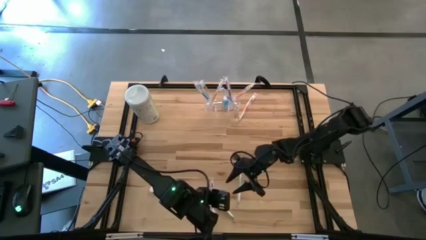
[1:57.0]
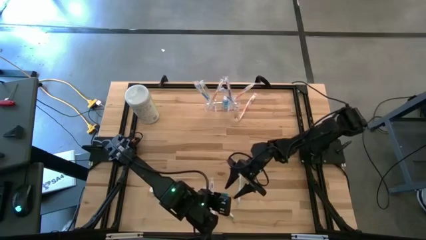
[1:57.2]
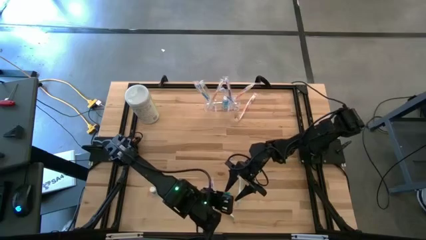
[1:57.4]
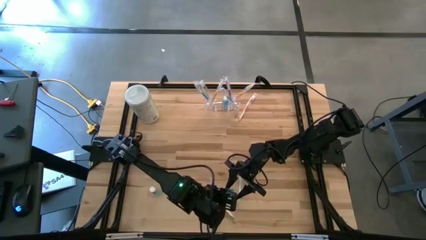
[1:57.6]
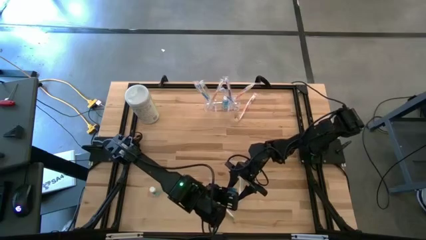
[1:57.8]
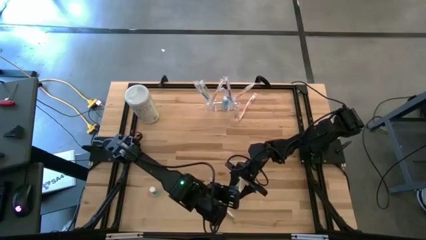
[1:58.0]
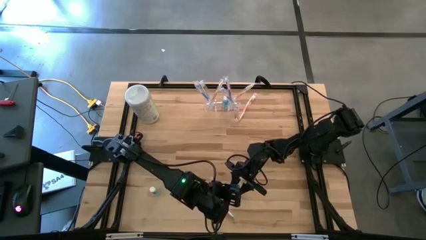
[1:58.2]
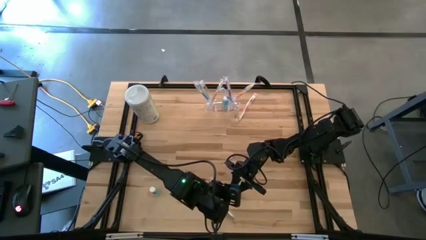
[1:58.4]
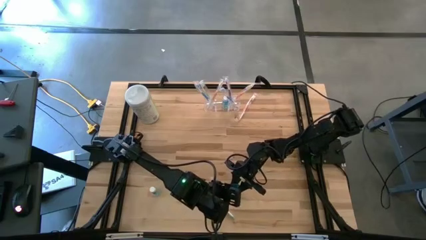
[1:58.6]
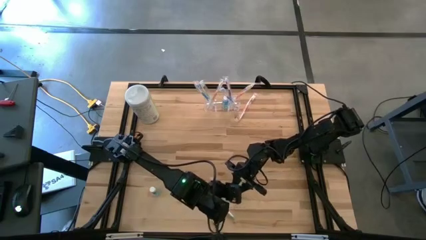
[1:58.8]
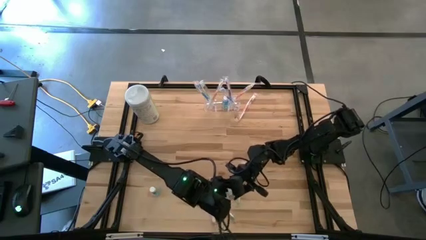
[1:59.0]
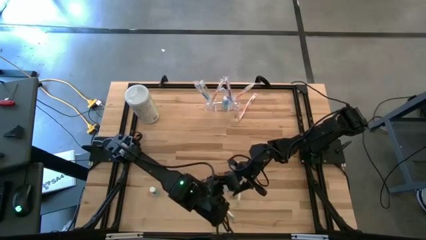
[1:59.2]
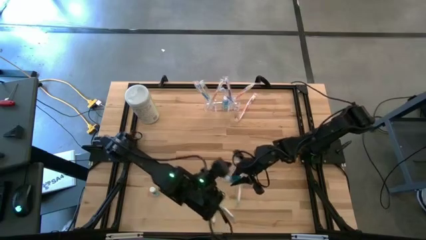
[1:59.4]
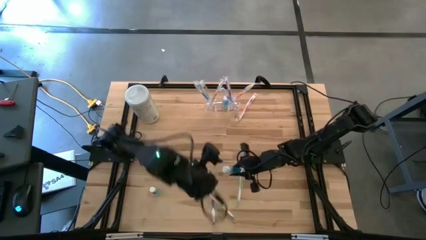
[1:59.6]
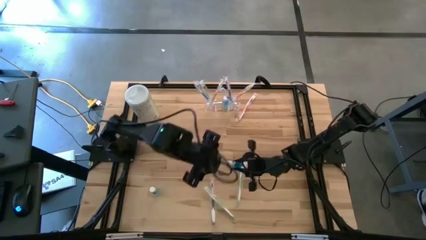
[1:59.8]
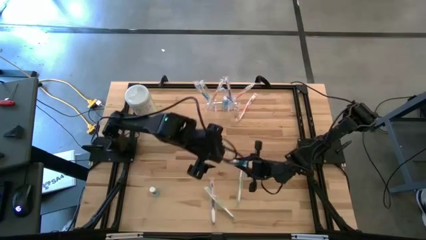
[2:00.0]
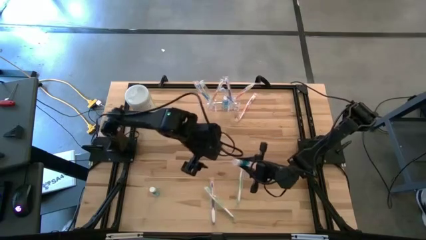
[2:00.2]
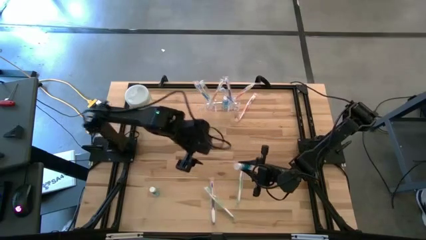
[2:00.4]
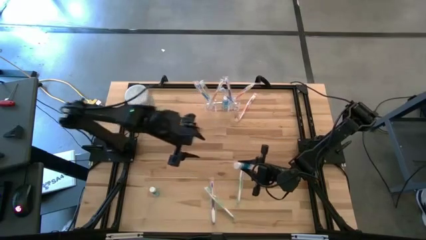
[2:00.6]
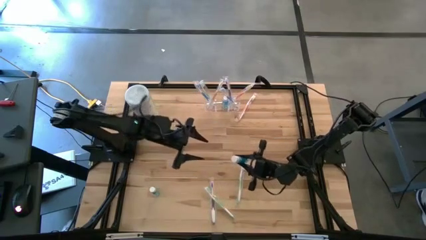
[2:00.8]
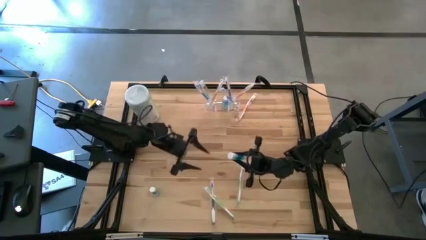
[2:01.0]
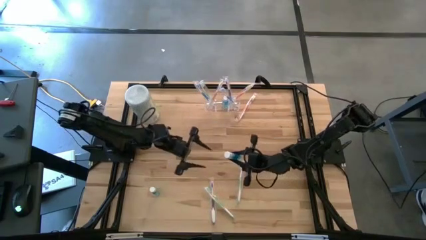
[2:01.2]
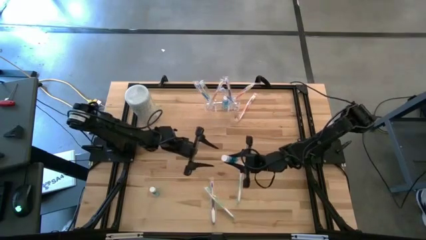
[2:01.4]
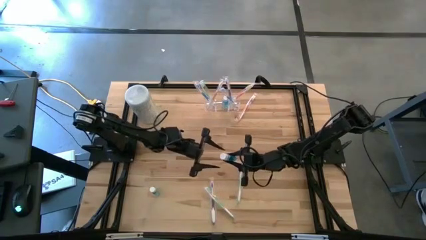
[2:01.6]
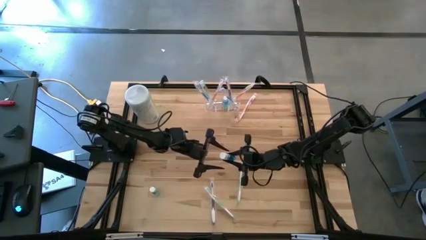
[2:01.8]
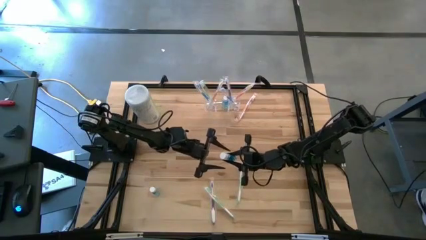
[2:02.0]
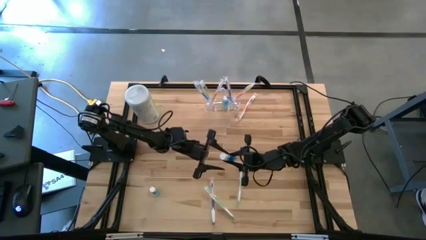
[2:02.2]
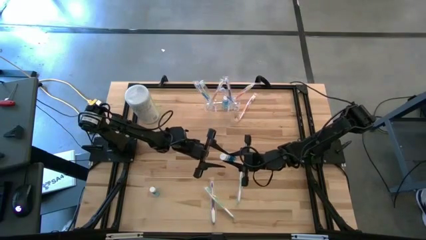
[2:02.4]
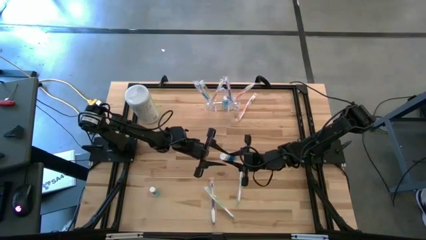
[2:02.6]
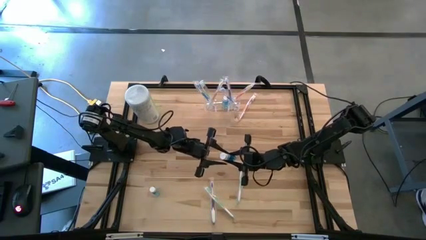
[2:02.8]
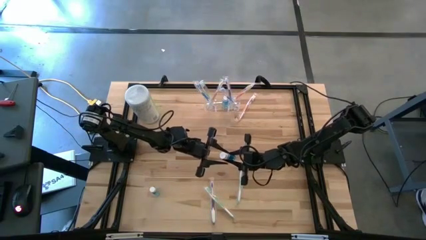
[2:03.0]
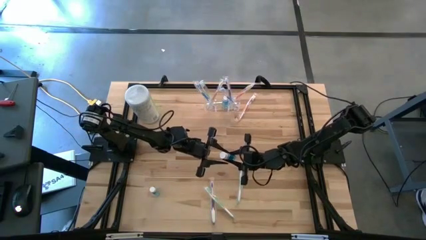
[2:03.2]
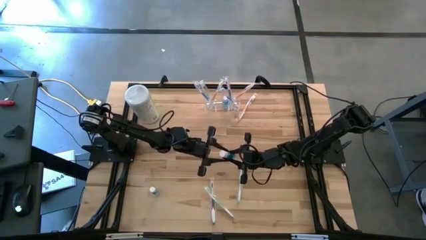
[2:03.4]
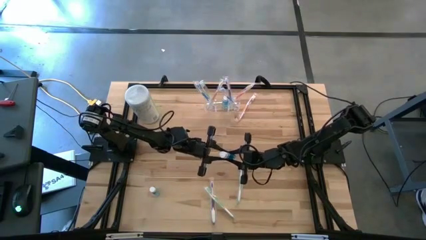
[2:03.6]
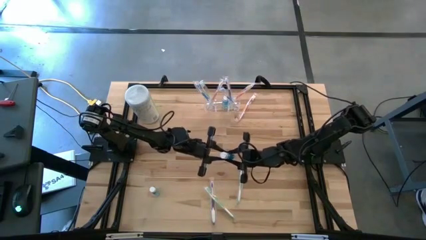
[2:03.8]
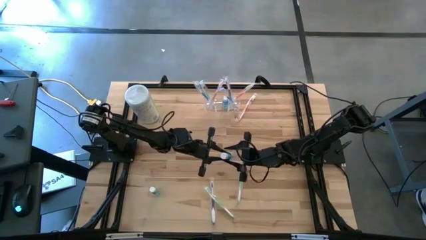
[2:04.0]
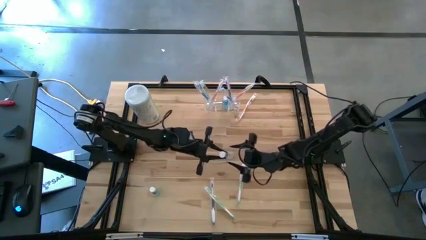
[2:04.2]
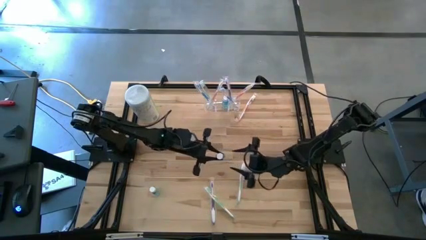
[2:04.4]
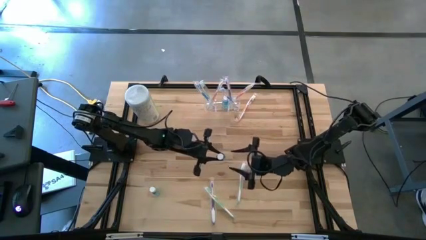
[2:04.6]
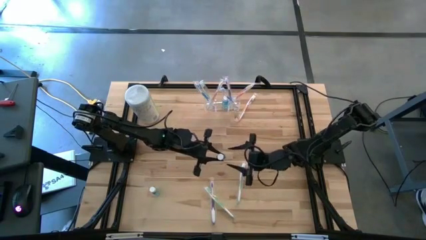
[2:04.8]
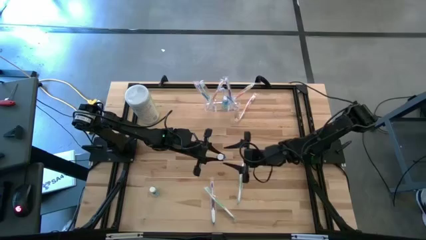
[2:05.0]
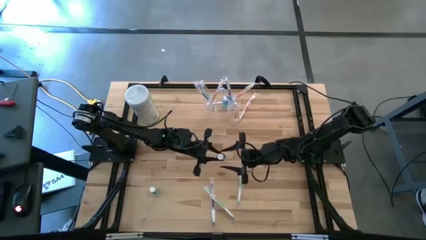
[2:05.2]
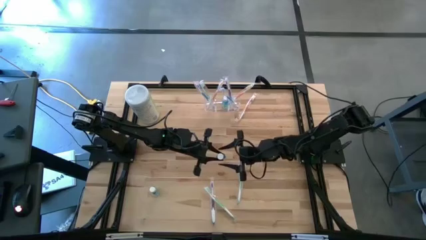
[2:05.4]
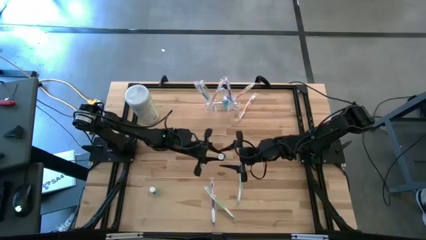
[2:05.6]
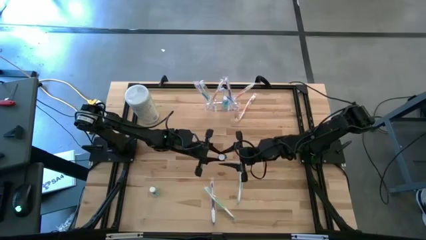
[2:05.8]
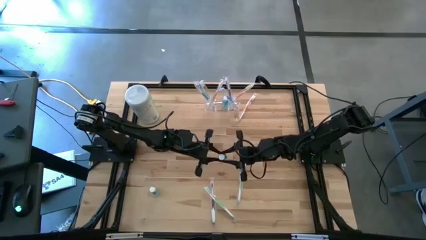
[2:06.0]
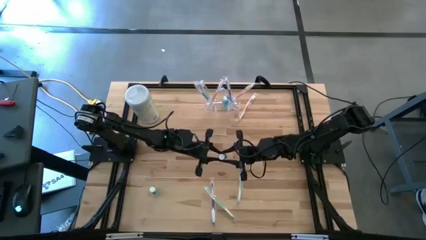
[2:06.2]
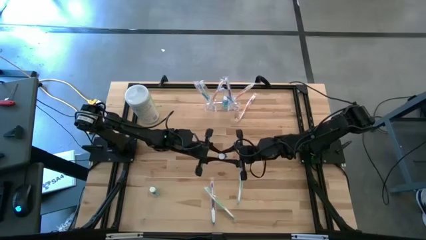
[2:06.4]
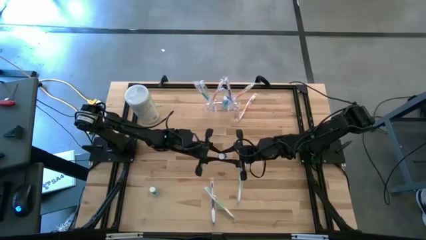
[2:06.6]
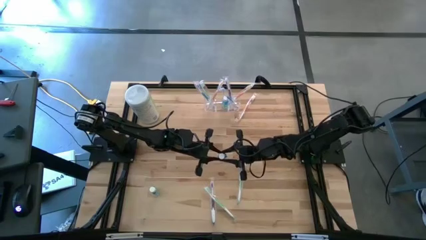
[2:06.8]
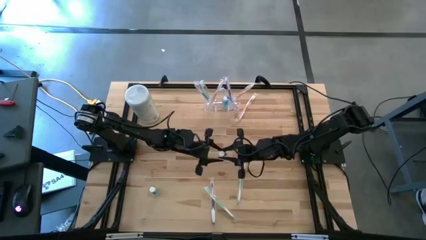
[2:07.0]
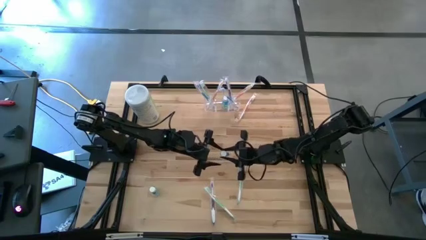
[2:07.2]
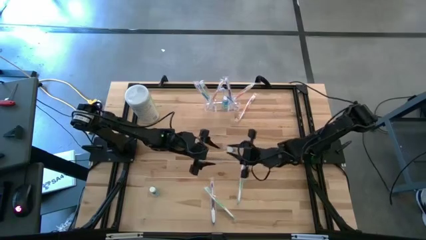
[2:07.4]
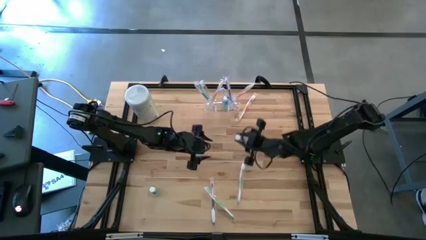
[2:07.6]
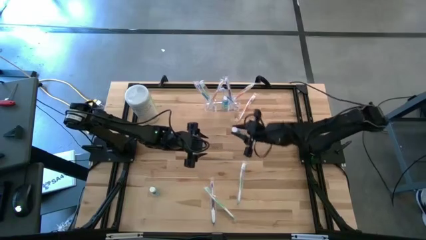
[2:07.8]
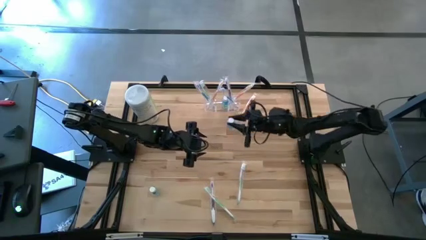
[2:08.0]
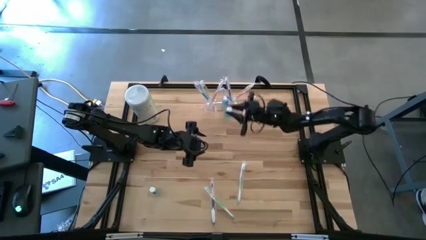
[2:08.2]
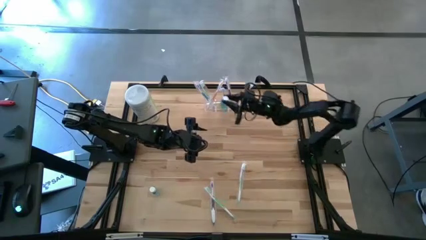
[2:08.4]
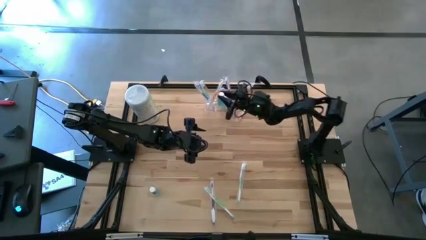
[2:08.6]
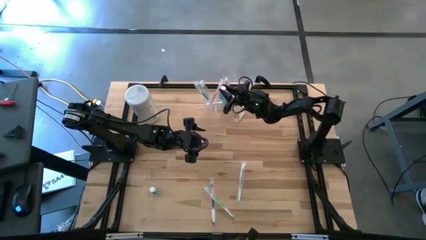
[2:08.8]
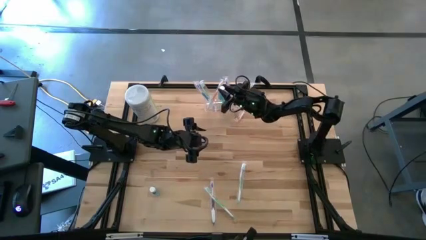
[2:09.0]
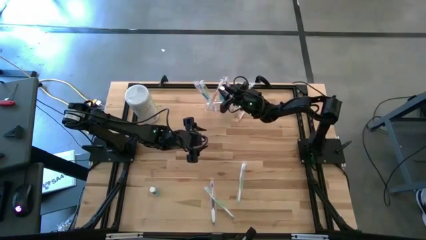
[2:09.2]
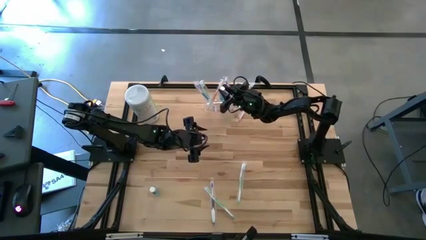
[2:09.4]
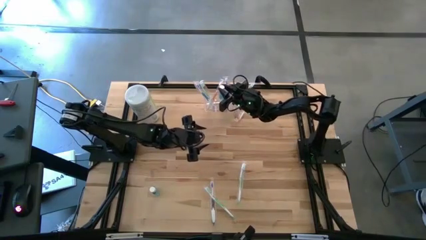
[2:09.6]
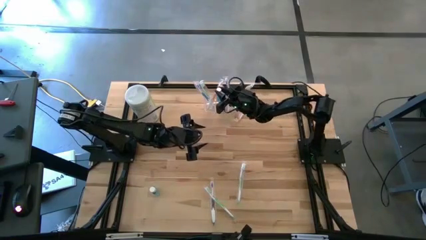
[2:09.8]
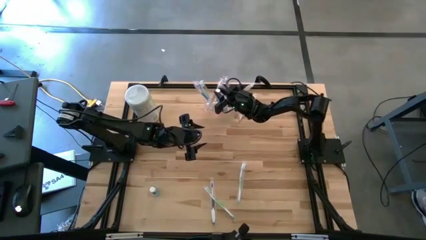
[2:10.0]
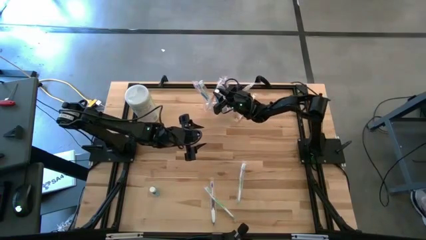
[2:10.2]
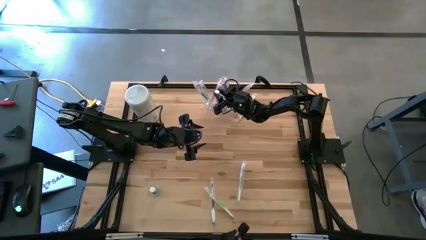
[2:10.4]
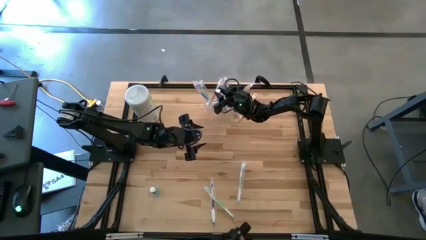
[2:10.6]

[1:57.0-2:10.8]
Task: Pick & Place toothbrushing station
Put the top mouthwash into the transparent organizer

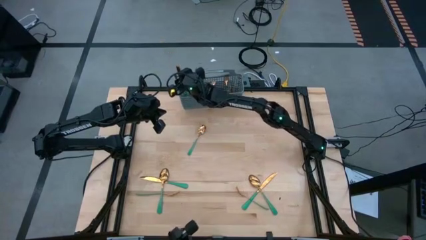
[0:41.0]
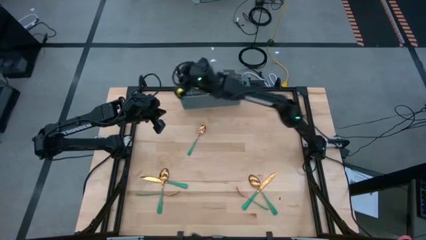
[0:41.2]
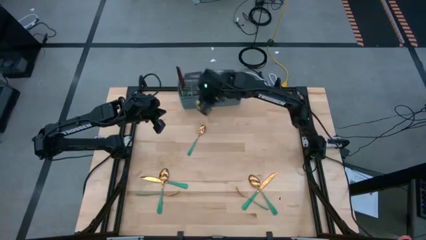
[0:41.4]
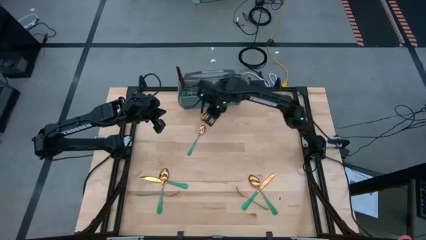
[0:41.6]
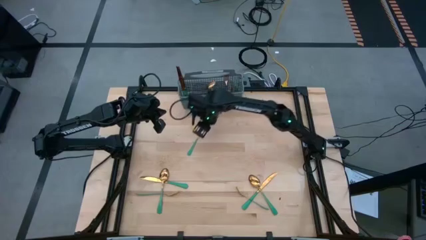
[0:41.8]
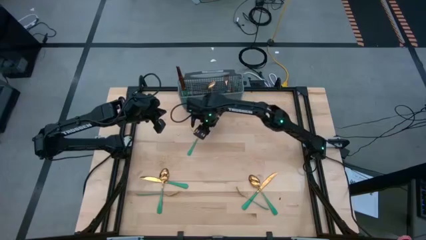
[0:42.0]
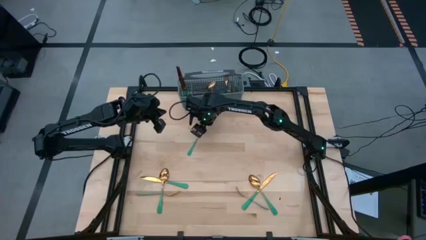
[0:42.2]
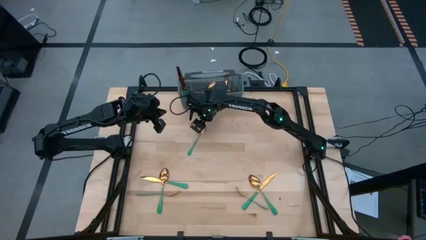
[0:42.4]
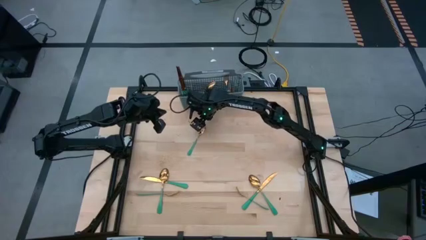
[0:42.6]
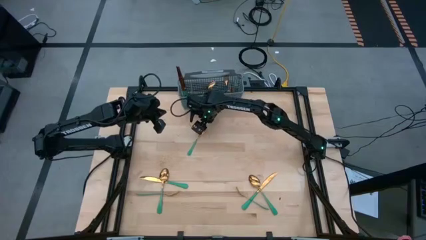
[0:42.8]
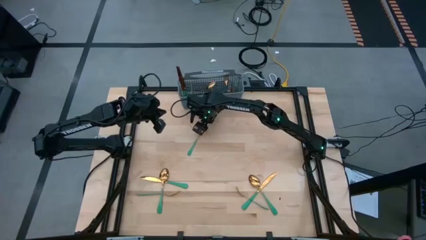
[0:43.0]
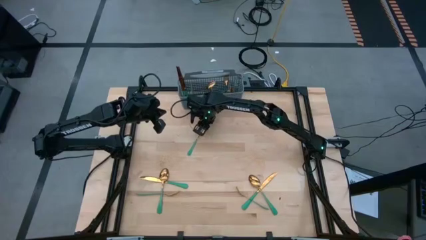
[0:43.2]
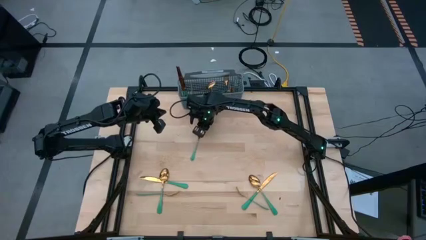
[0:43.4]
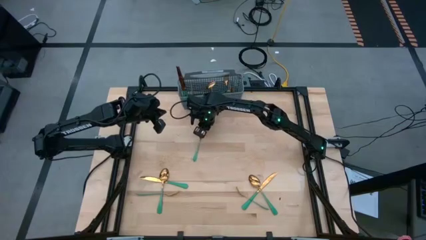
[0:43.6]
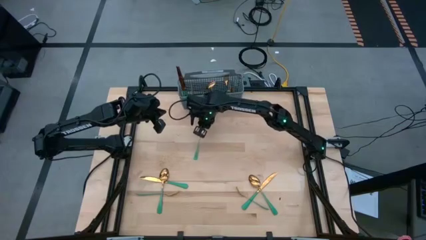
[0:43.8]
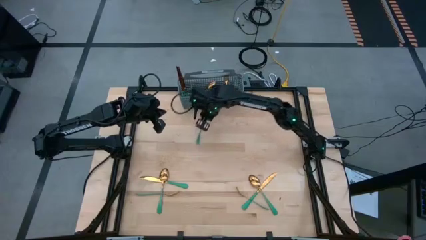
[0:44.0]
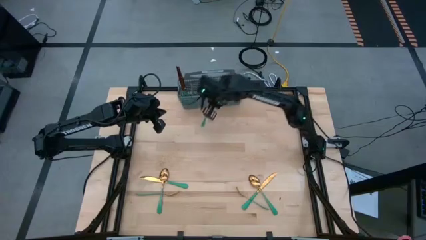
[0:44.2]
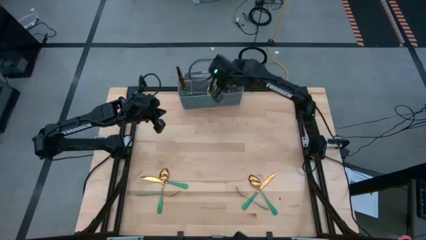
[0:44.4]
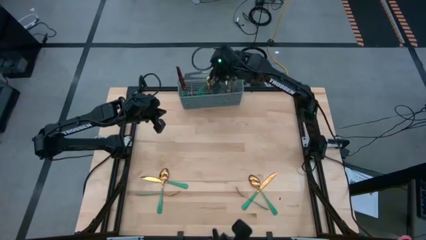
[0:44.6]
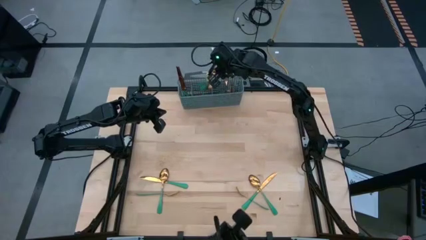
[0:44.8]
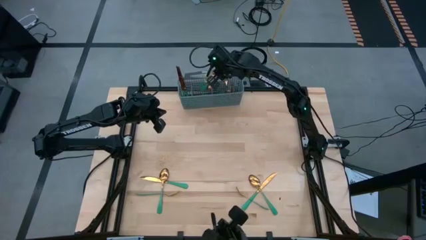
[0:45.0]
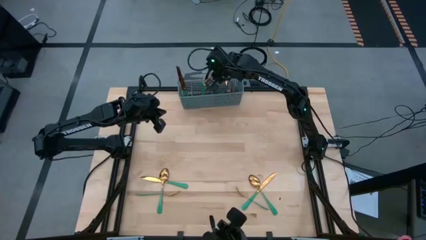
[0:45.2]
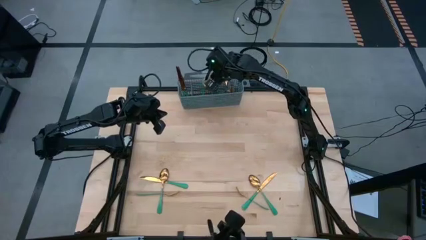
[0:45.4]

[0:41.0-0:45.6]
Task: Sort silverware
Put the green spoon into the gray bin
